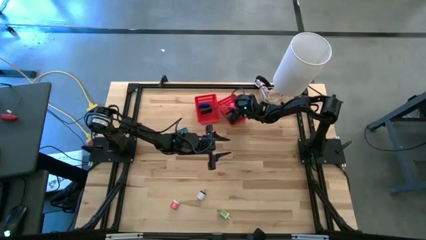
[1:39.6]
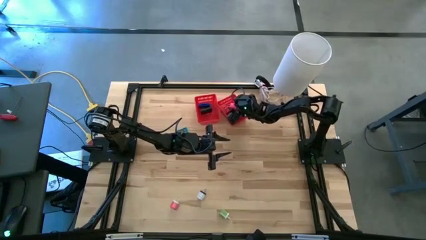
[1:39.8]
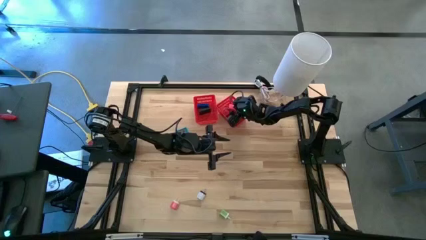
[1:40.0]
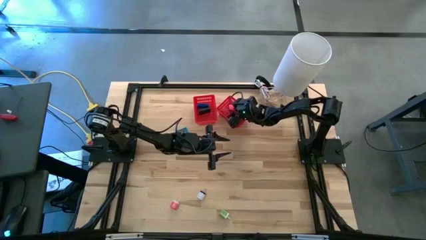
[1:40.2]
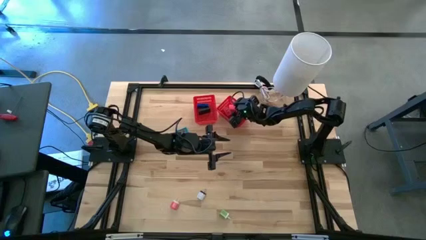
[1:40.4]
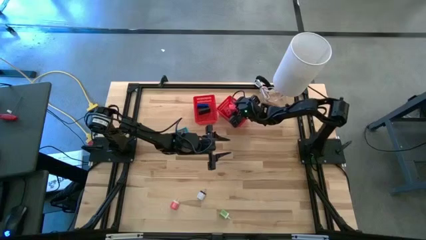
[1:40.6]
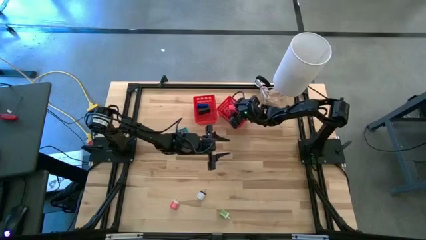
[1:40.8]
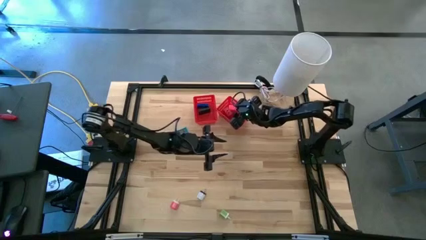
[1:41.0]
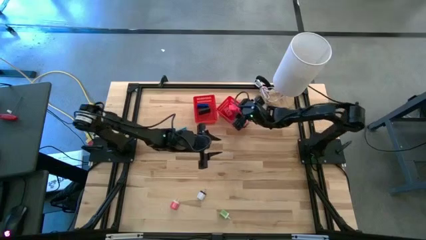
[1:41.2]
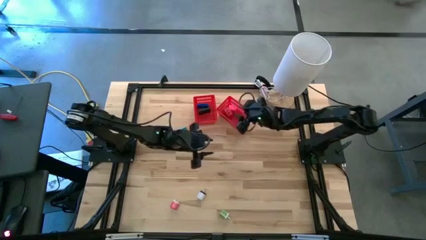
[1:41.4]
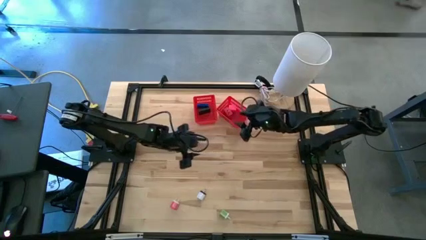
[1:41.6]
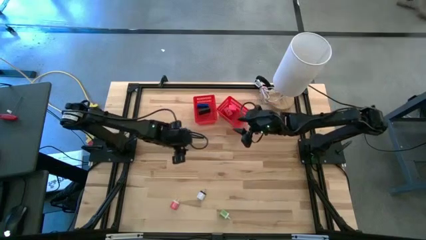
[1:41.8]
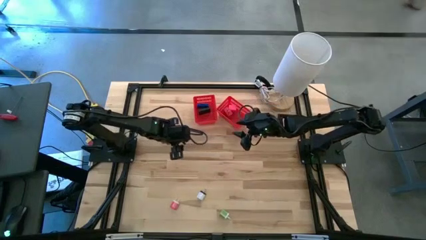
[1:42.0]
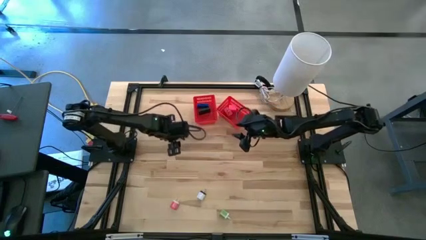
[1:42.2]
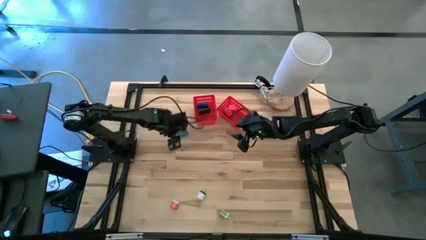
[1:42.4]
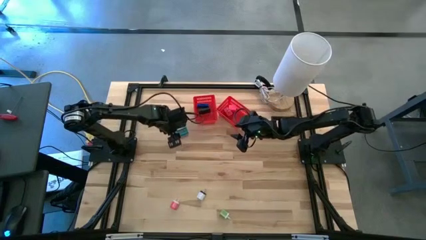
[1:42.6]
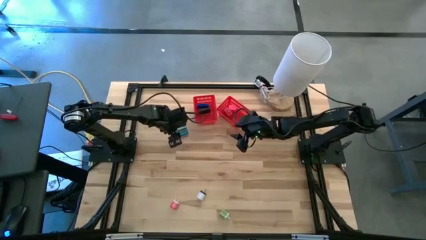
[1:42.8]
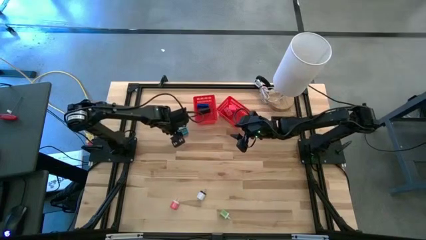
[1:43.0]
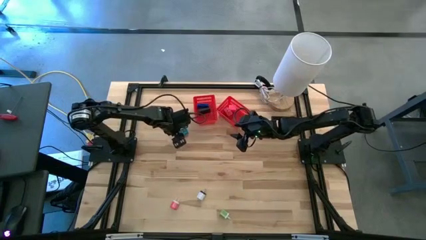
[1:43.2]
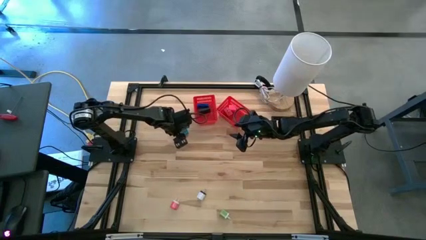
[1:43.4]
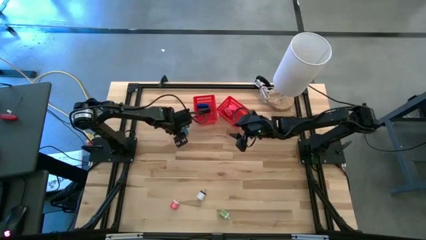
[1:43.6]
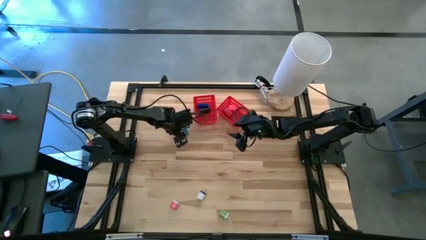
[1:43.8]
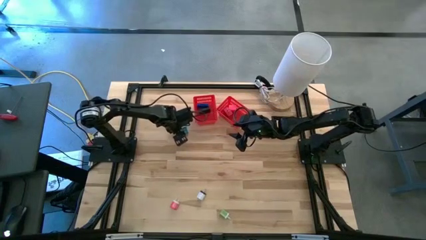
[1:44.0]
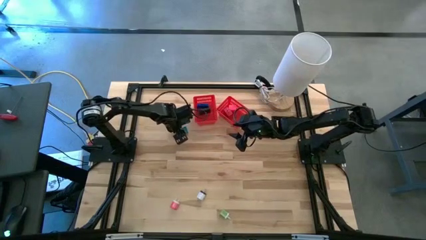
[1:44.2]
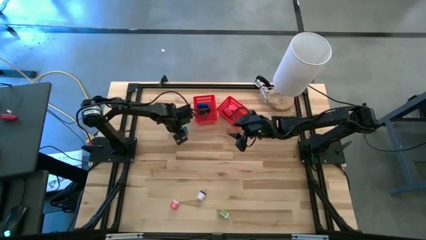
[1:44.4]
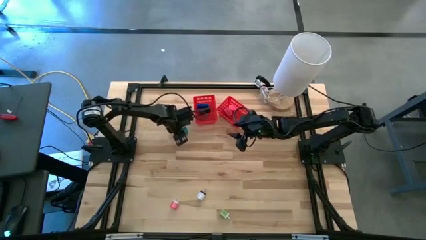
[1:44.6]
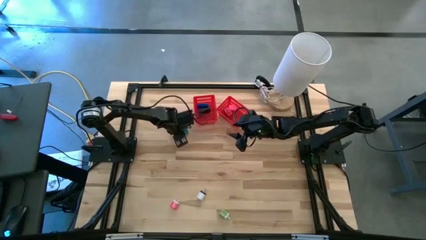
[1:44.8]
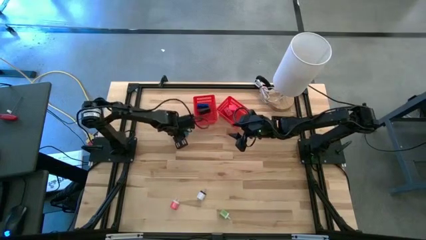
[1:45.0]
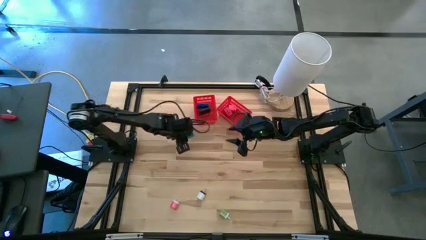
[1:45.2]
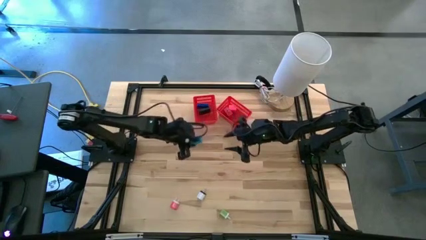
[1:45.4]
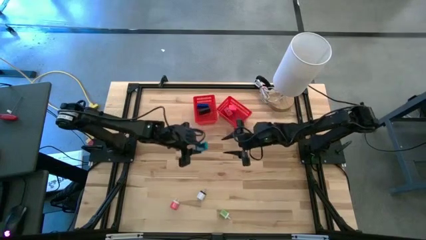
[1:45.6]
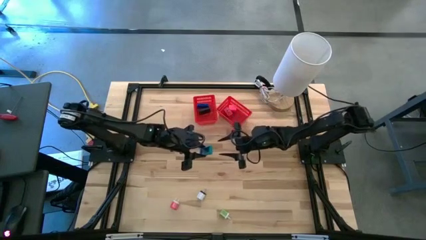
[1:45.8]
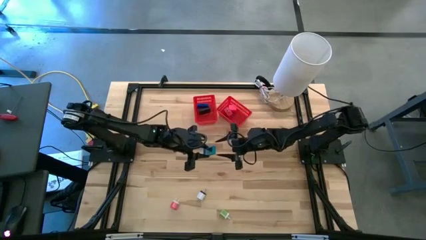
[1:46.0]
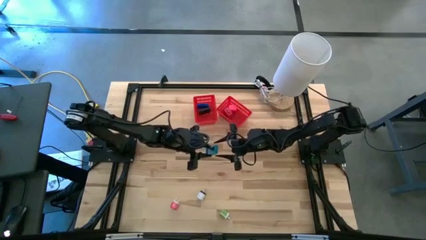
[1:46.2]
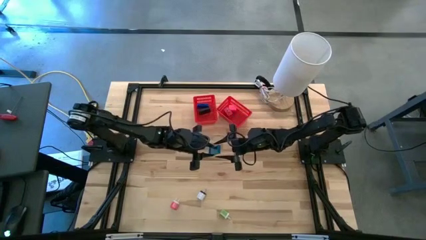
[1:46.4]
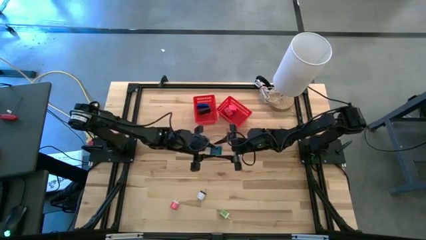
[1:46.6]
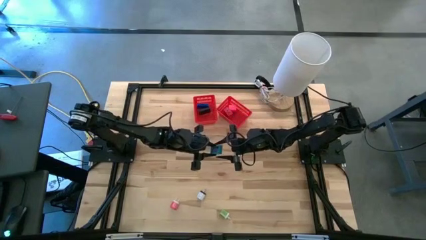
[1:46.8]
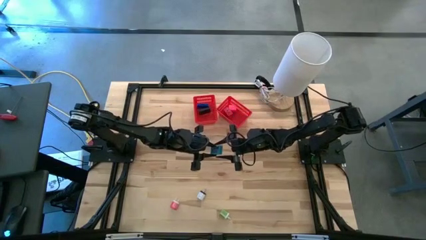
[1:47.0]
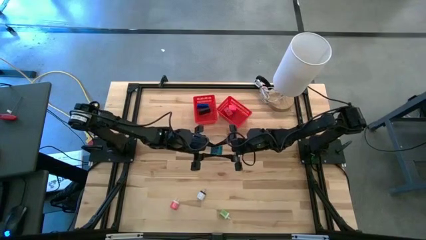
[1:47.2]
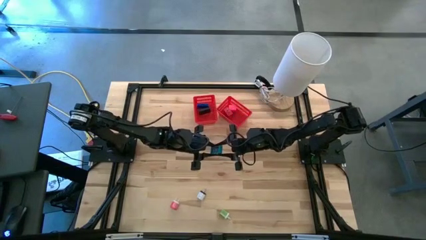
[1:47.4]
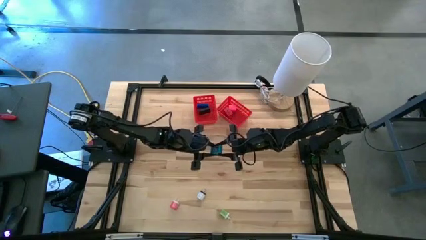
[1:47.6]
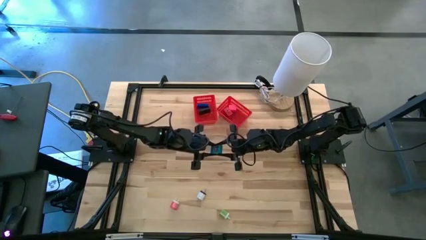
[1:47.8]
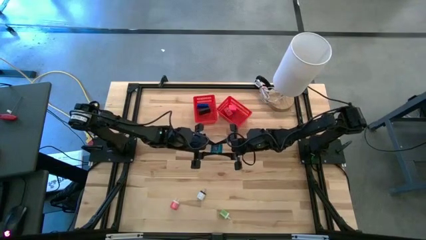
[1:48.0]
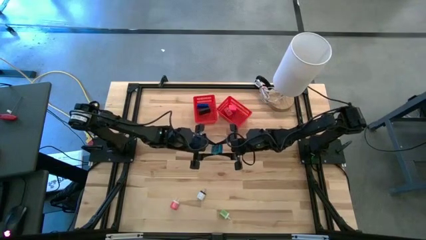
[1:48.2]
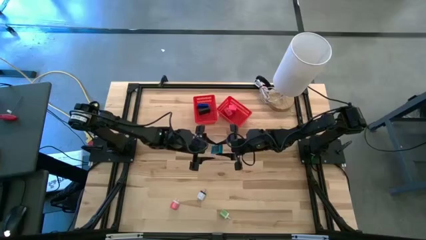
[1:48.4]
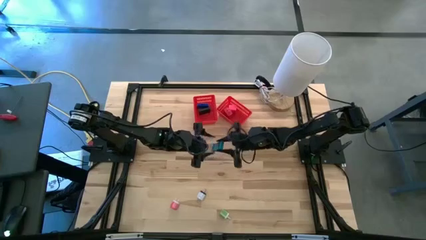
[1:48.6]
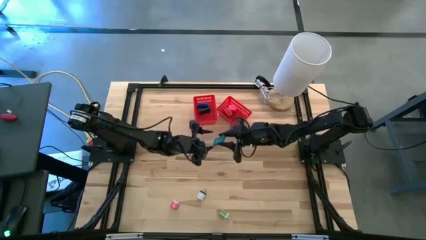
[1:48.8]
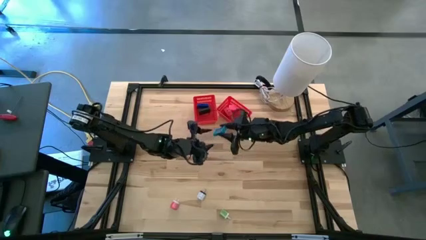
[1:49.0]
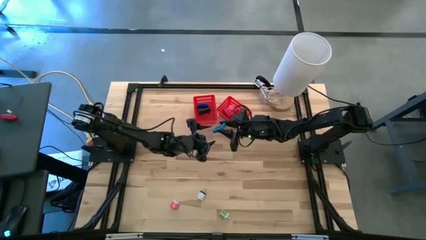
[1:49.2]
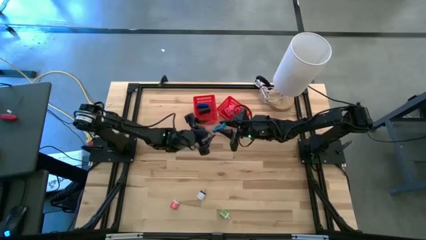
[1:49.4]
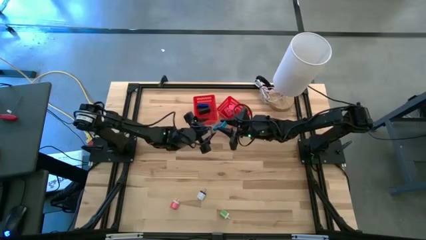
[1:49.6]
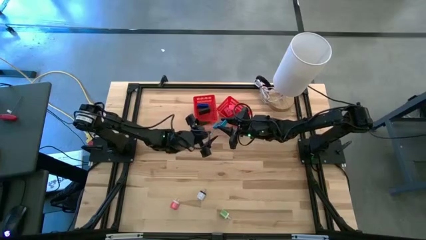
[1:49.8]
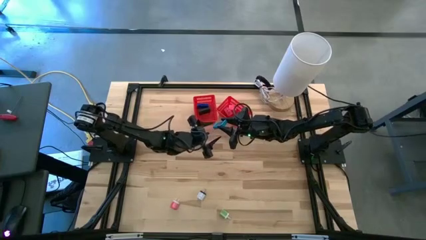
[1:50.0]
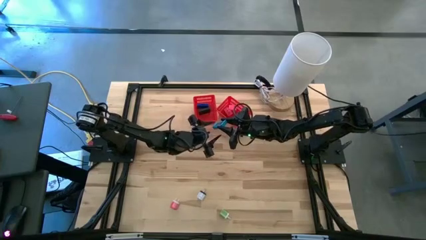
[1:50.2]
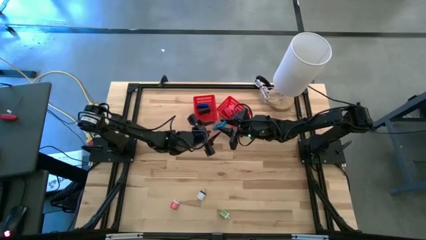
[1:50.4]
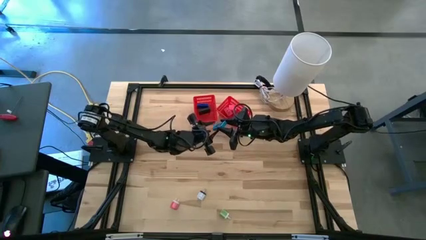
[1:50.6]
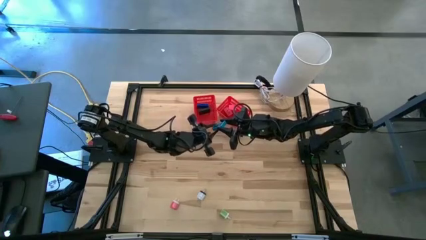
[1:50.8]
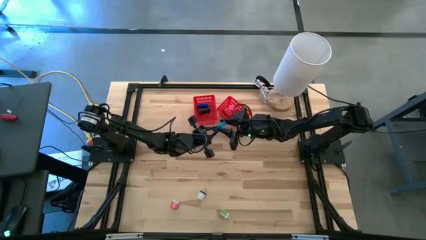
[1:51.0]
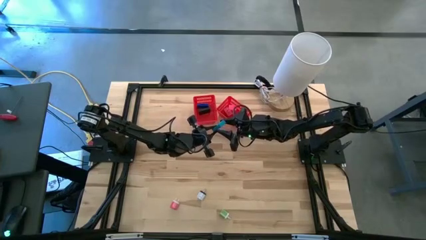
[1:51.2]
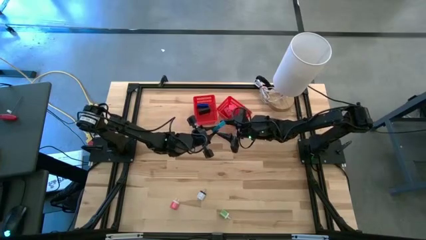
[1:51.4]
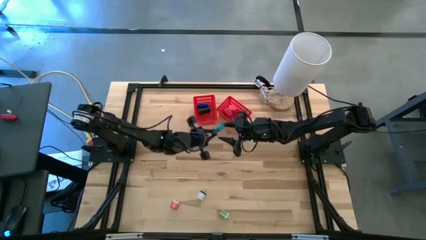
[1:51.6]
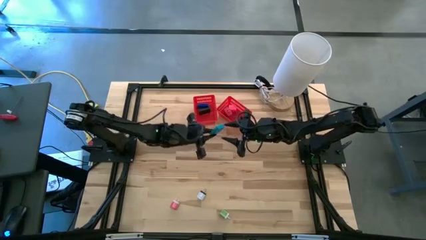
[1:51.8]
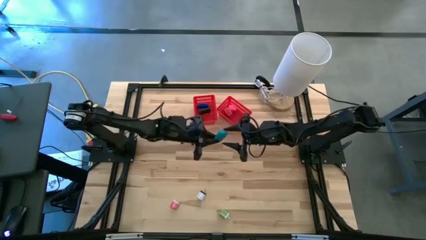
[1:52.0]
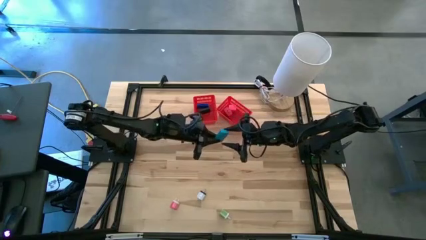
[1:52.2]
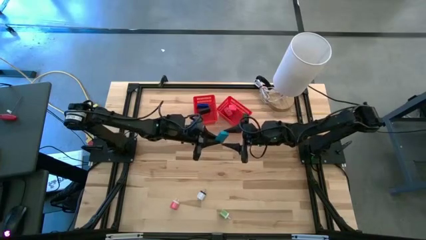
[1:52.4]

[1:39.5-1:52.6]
Task: Pick & Place Office items
Put the light blue digital clock into the left red bin
